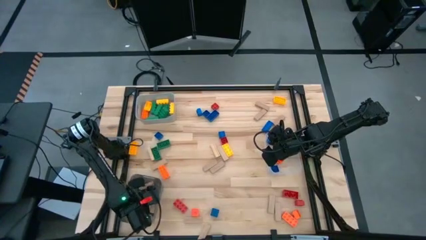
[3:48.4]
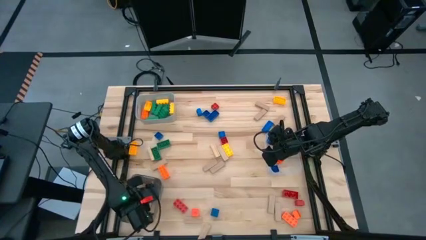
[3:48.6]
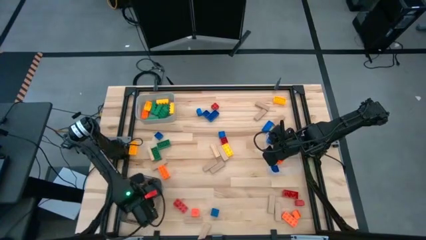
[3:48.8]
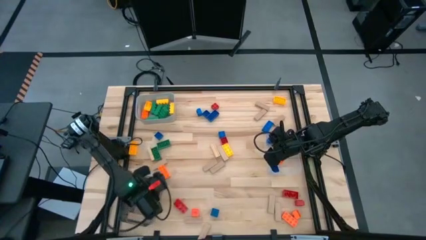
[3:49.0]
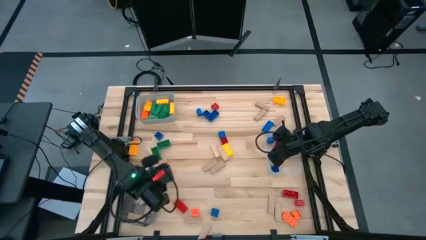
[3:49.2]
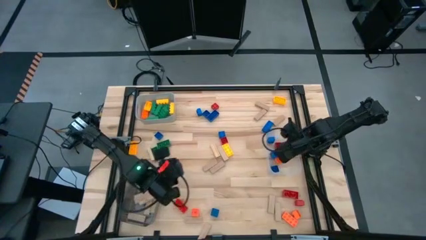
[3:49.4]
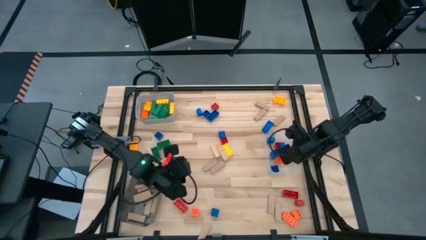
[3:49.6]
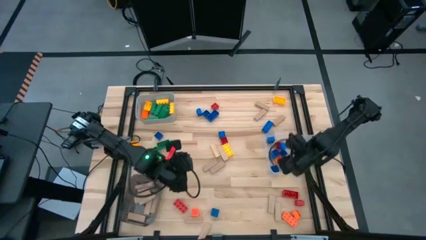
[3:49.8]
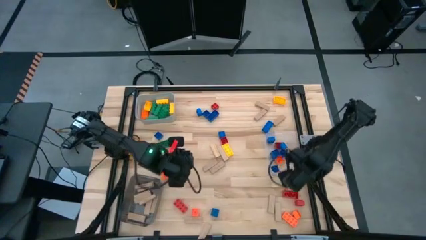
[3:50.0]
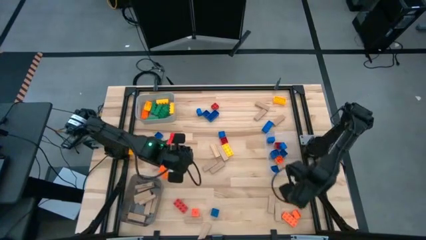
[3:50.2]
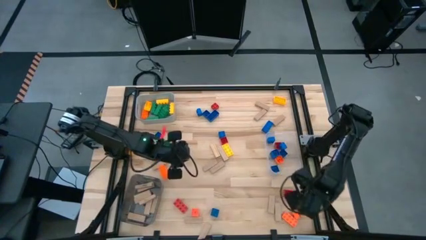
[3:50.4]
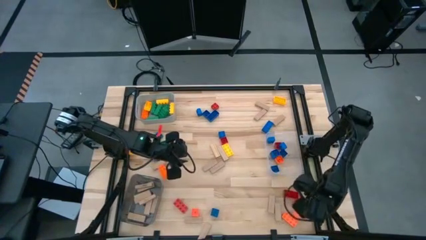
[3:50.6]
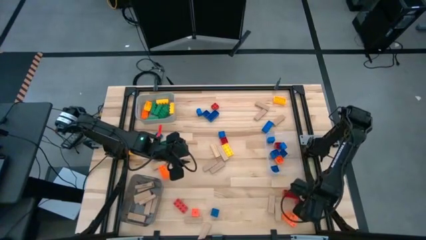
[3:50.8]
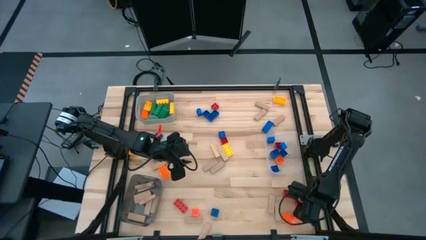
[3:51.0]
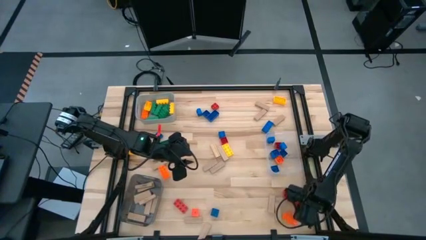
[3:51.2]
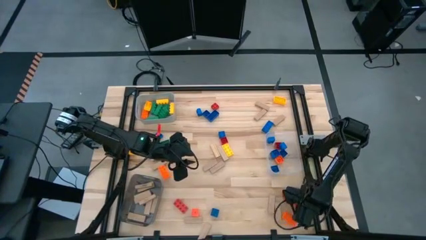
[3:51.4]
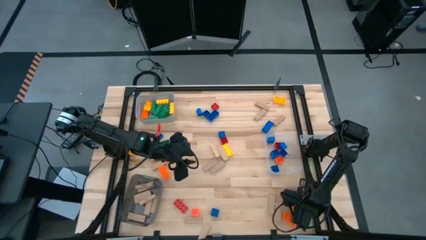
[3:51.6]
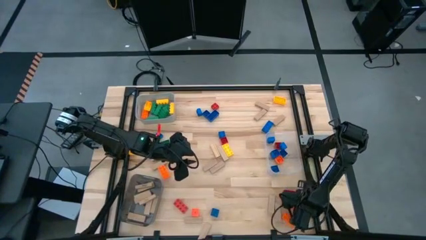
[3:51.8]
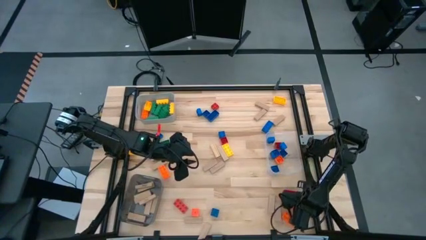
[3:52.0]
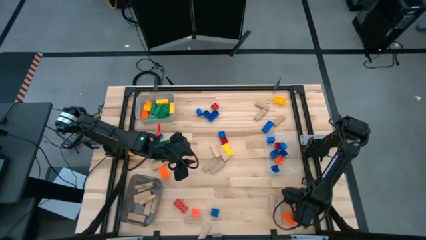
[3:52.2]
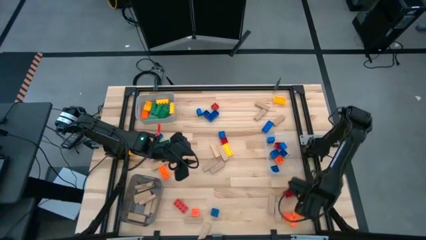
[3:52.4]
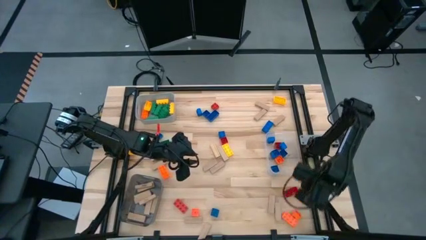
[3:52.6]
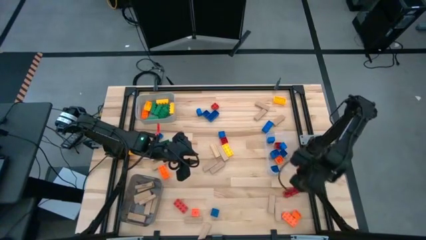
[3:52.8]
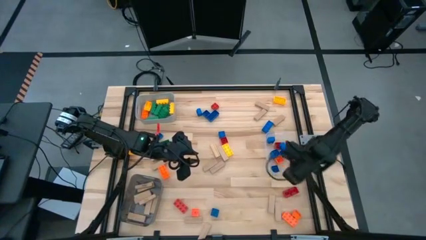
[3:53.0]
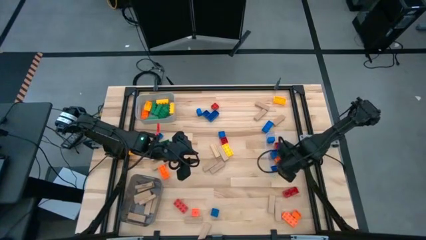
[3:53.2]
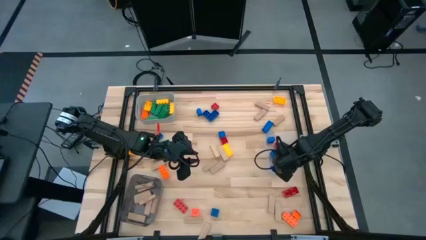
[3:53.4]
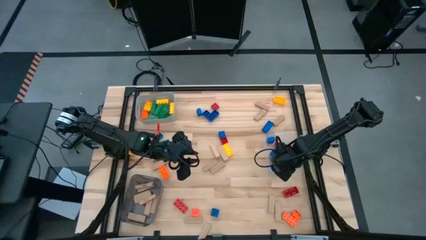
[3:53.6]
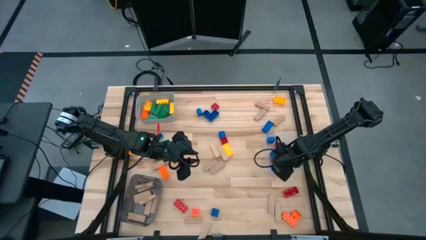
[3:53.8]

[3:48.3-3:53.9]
Task: Sort blocks by size
Put the small red game piece into the transparent bin

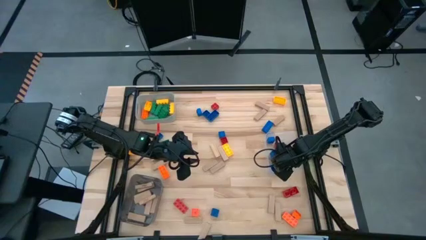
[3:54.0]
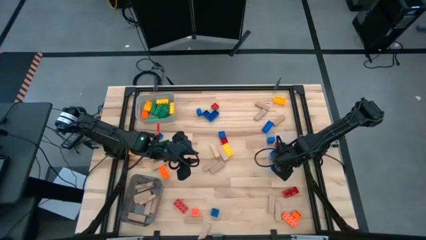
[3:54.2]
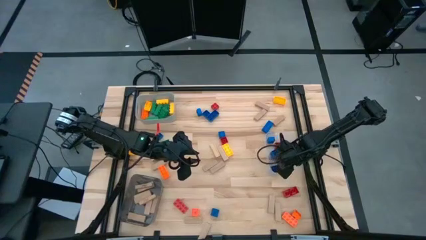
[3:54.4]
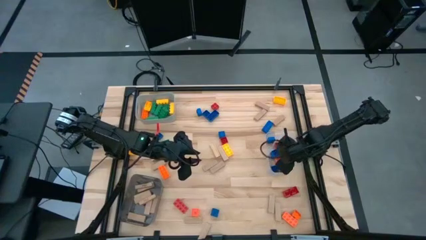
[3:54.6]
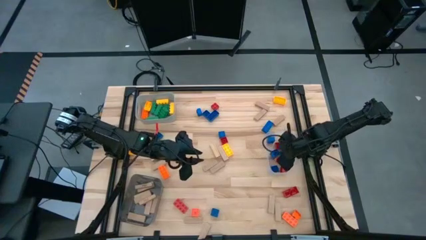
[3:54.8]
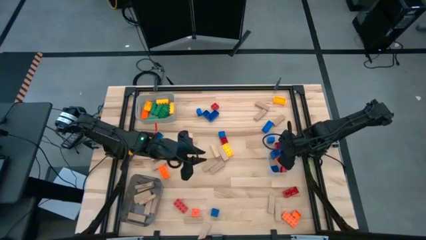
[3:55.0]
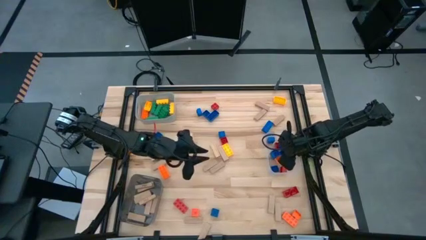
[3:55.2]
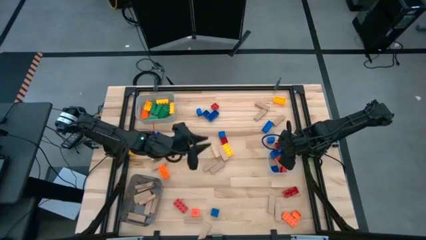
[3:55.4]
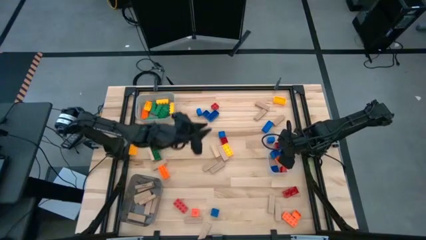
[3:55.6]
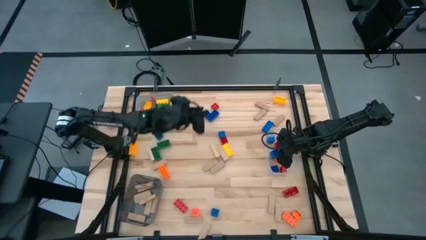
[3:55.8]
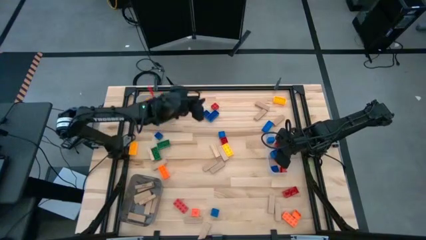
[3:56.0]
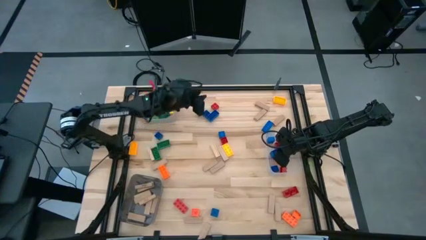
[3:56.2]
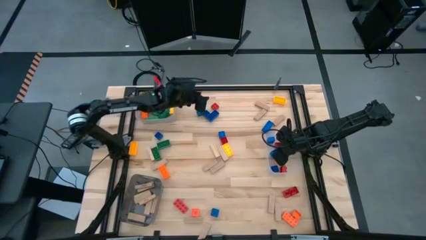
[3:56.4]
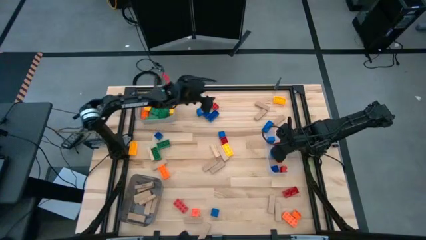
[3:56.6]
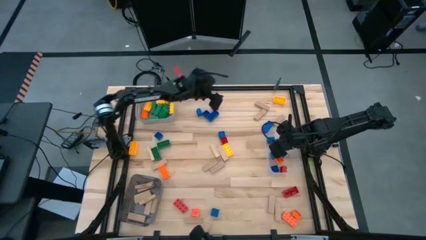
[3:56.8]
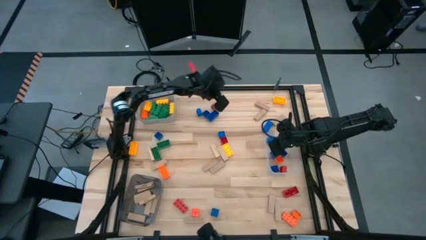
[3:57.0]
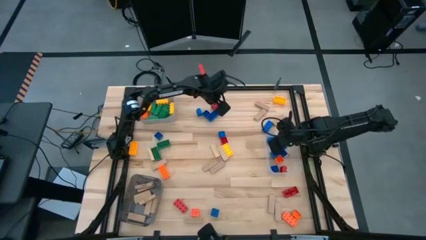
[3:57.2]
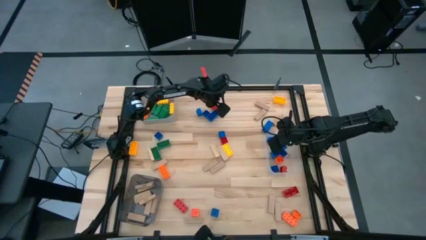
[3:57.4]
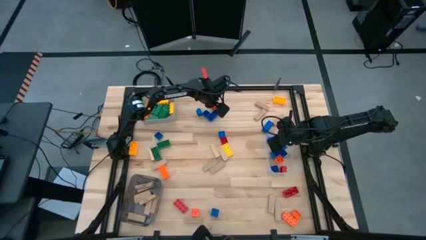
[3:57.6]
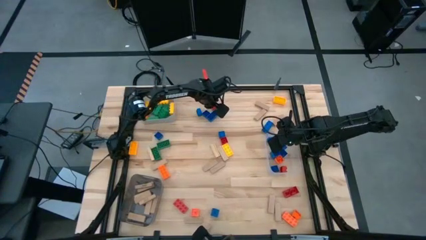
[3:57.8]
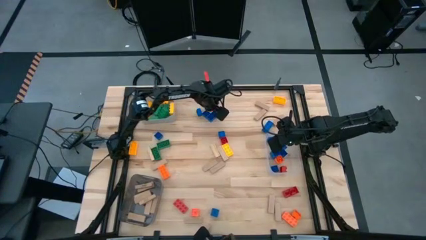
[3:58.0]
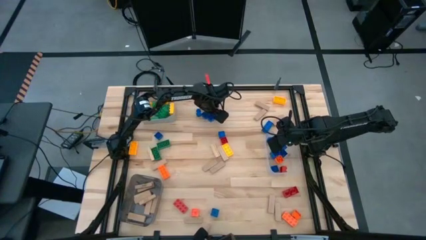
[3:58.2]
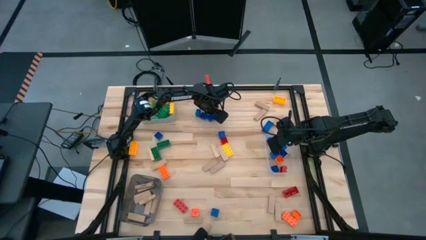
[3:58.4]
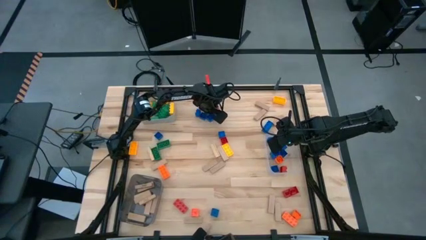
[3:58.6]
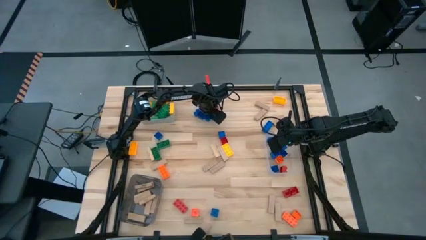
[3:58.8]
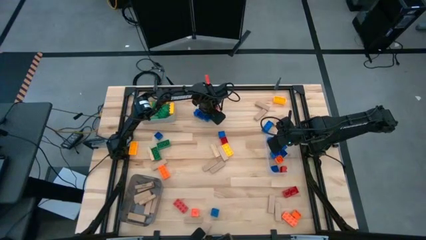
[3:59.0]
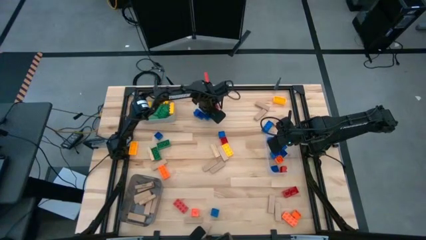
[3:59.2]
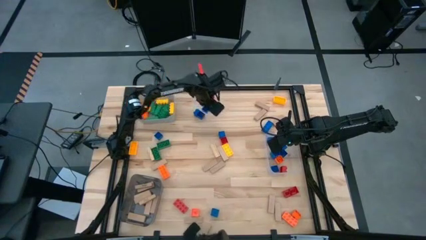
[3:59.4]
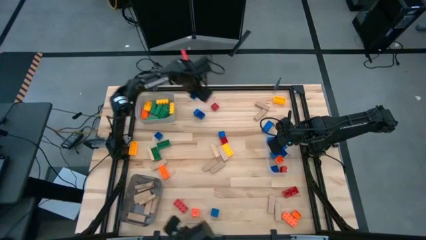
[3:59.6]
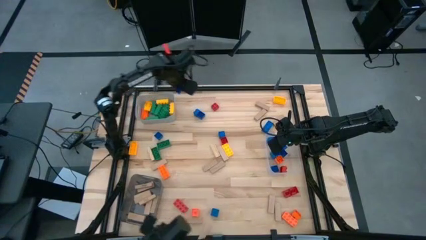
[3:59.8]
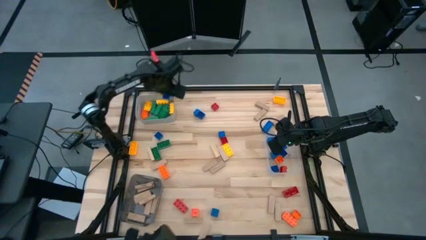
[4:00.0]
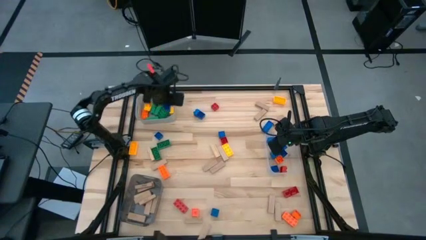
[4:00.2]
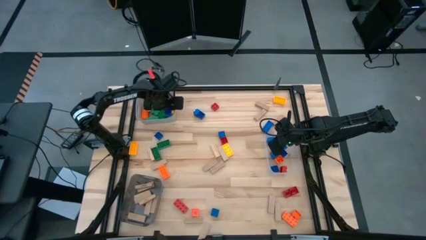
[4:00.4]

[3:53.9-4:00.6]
Put the large blue game piece into the gray bin
